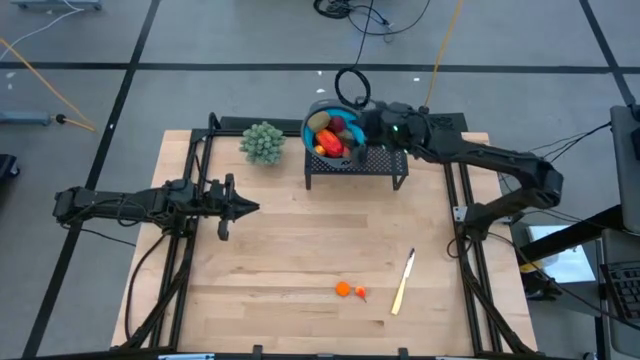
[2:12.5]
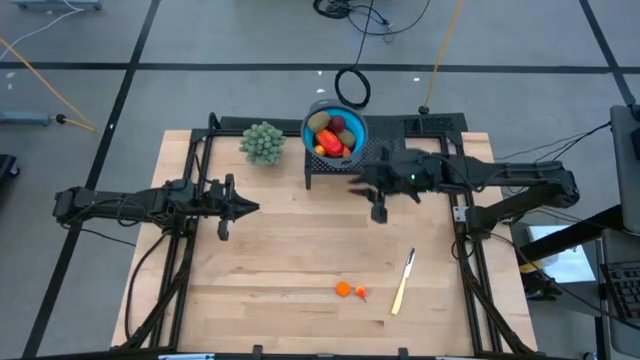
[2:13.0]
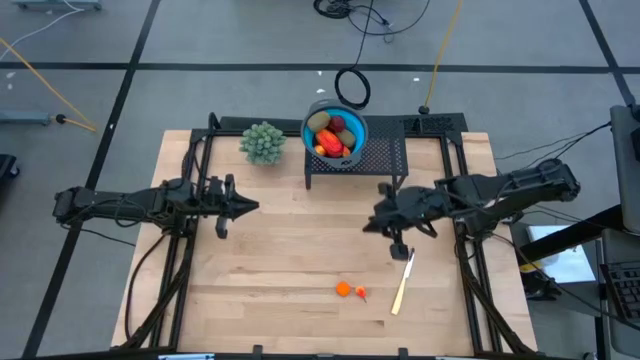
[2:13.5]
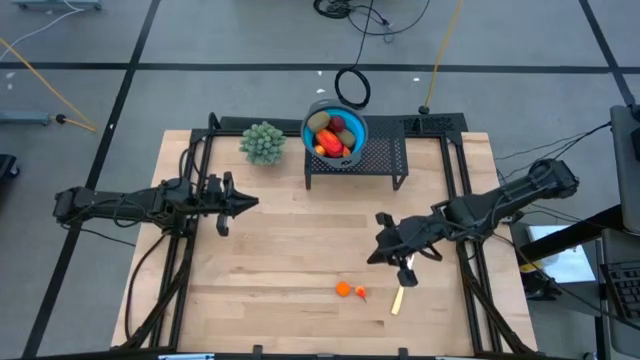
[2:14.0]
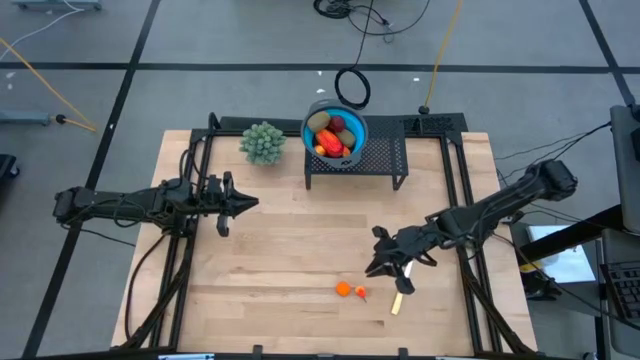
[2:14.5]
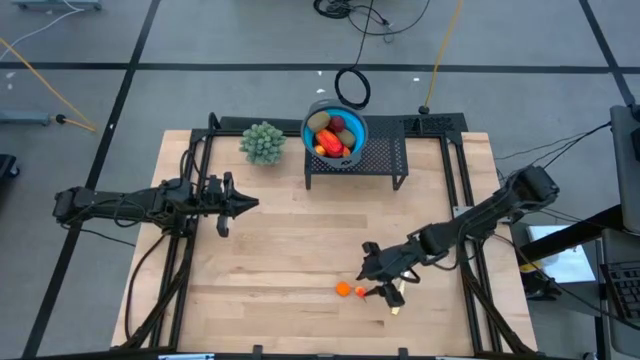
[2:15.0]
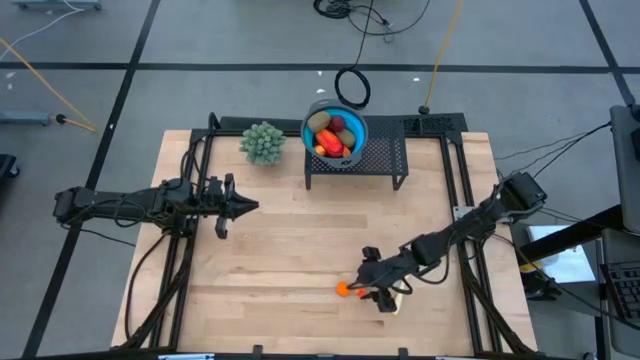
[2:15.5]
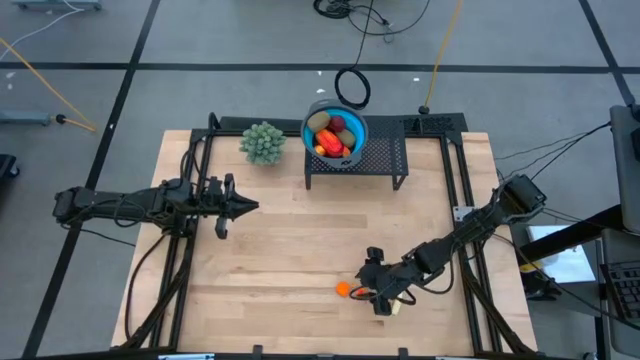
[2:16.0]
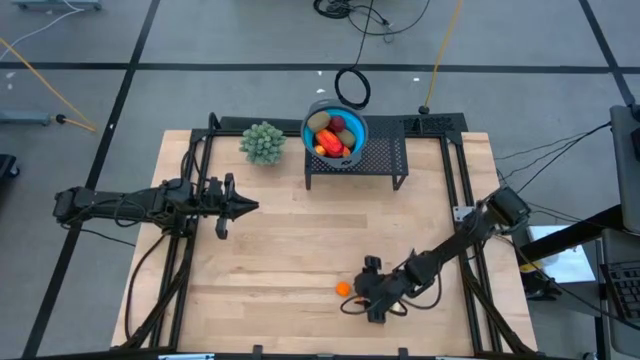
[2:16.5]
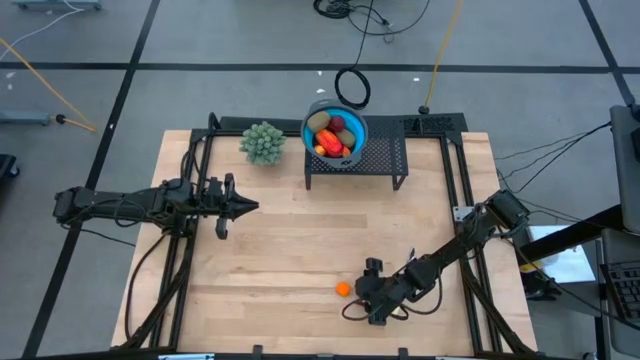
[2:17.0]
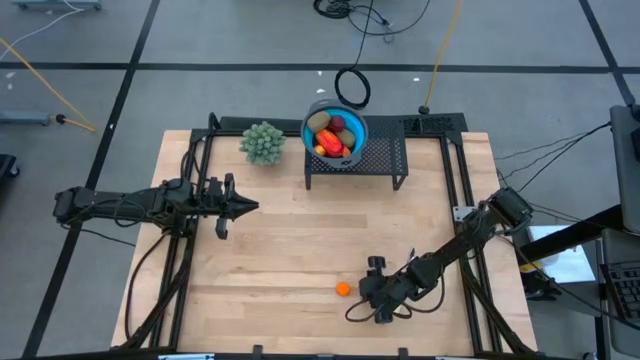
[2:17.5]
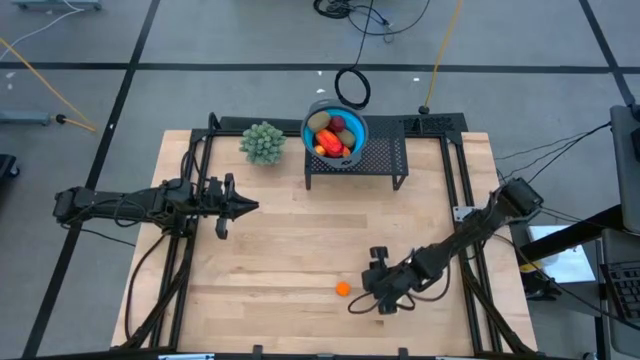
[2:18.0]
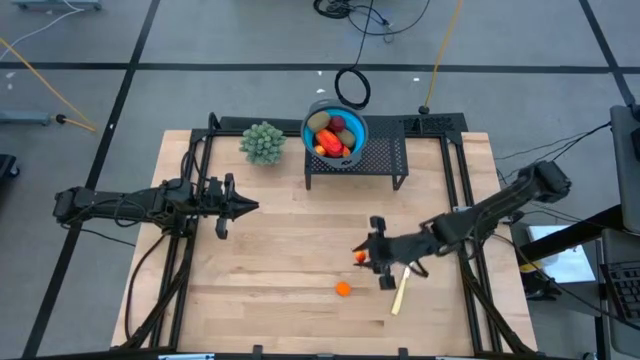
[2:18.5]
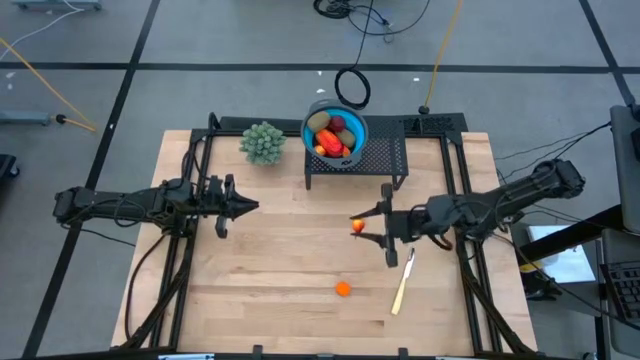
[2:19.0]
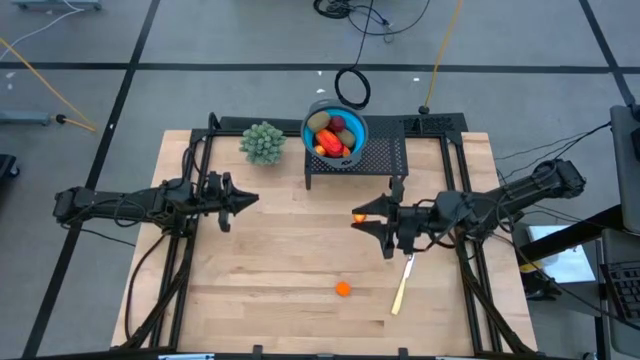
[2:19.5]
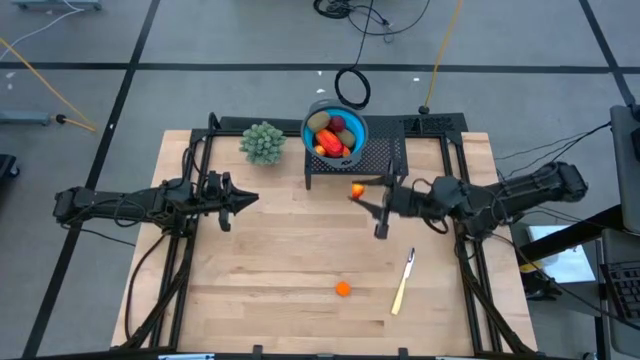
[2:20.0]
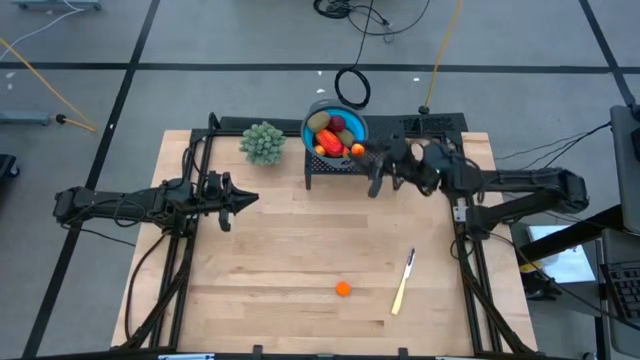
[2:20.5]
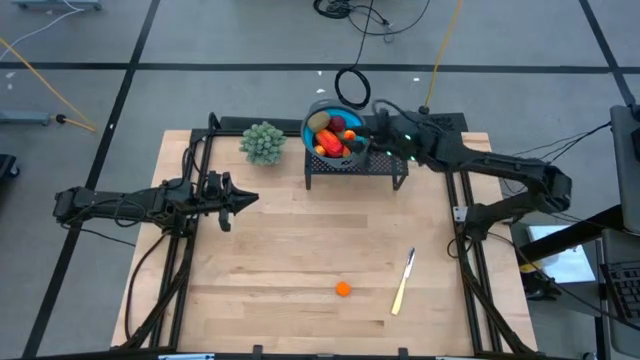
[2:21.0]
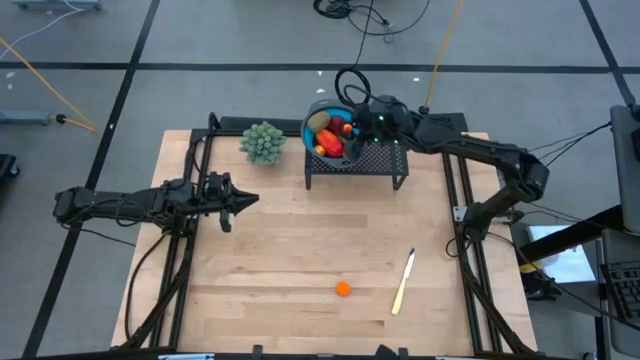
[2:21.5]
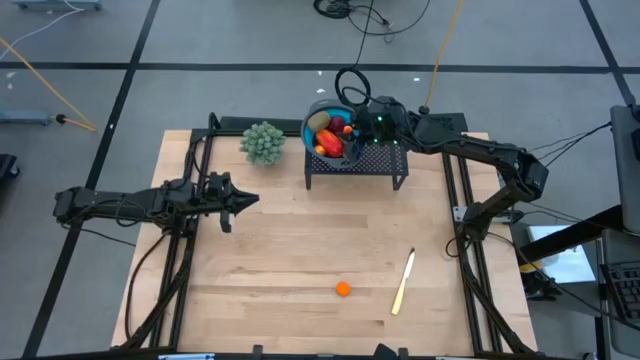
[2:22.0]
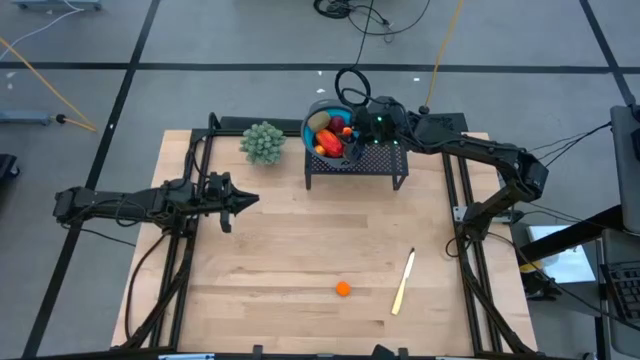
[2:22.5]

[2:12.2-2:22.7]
Task: Pick & Place Fruit
Put the peach into the blue strainer on the shelf

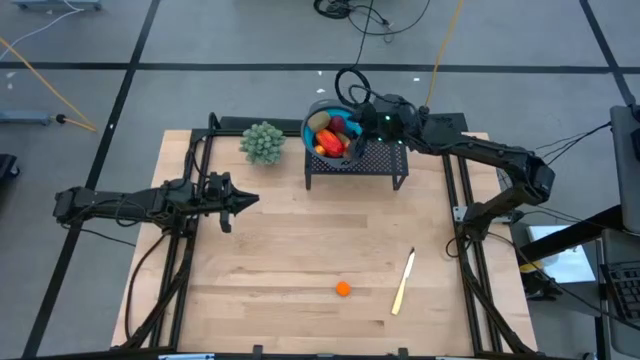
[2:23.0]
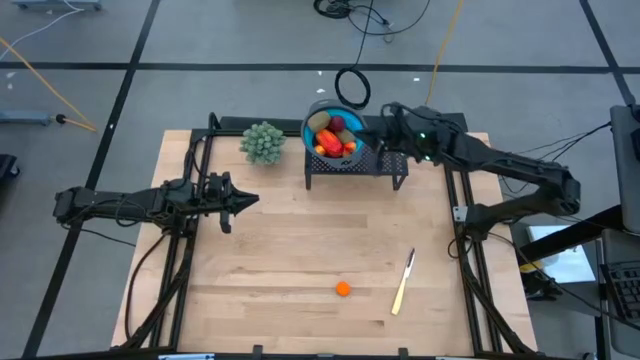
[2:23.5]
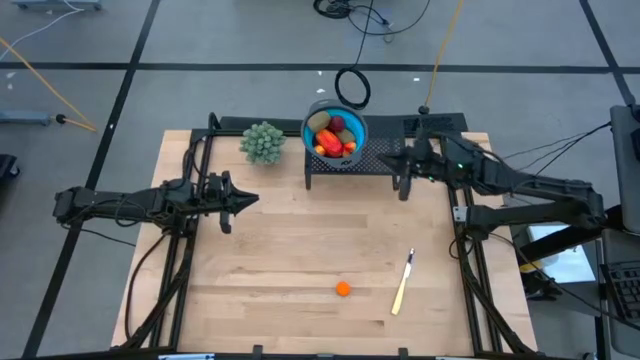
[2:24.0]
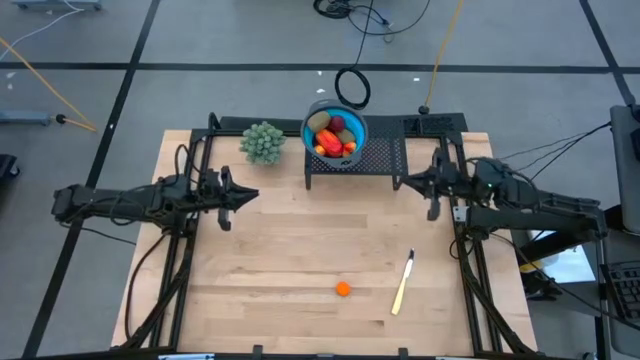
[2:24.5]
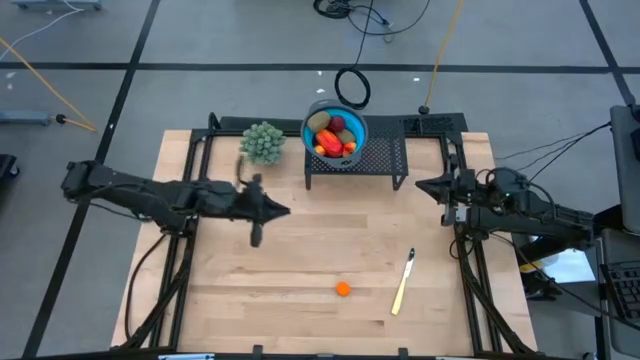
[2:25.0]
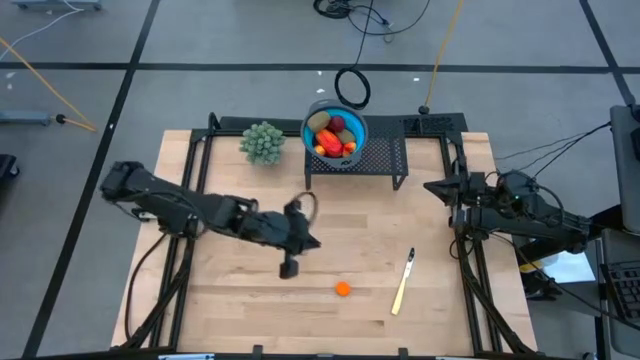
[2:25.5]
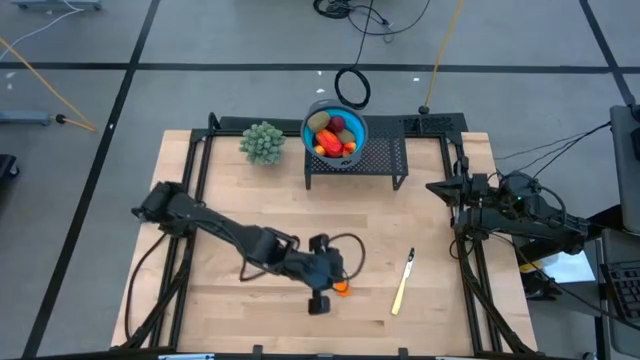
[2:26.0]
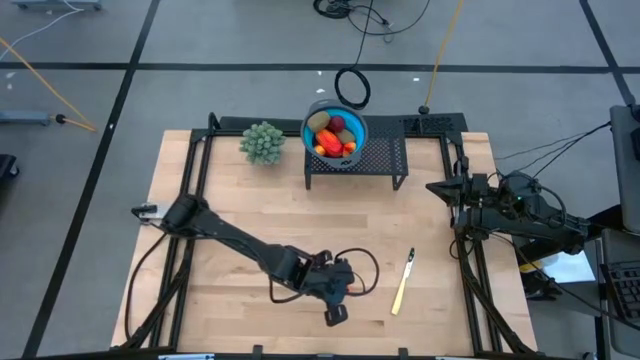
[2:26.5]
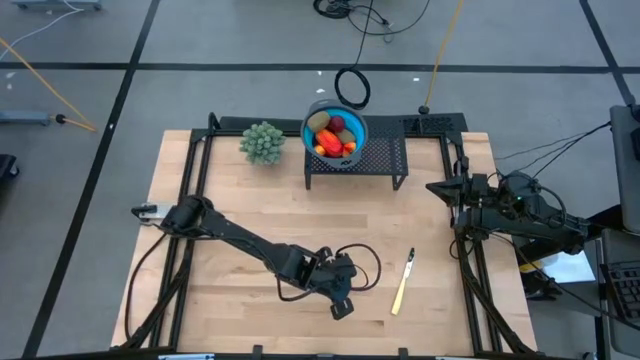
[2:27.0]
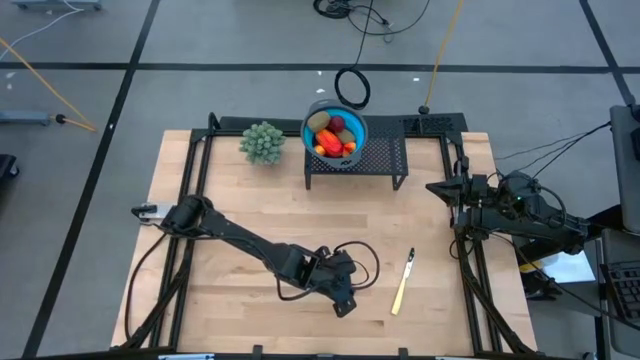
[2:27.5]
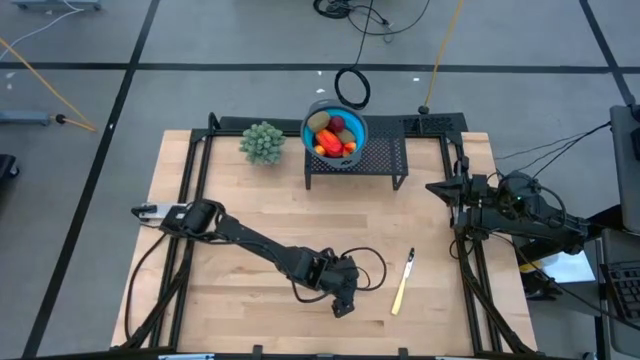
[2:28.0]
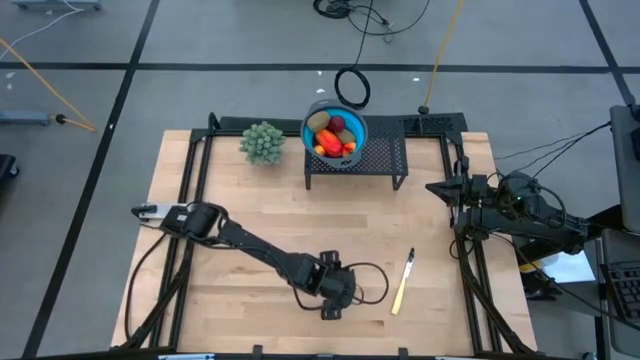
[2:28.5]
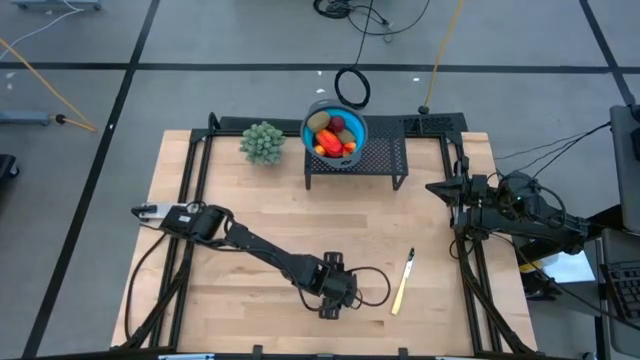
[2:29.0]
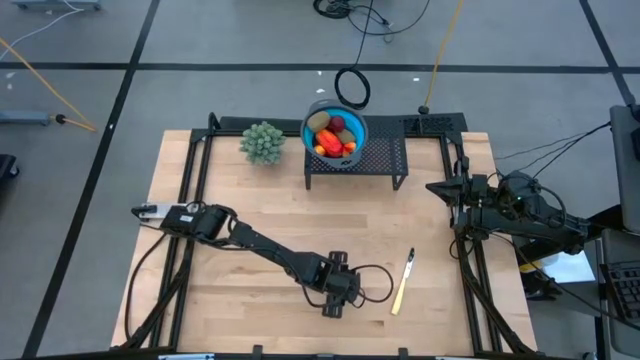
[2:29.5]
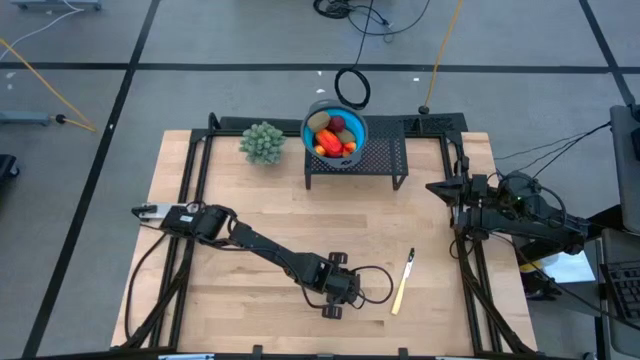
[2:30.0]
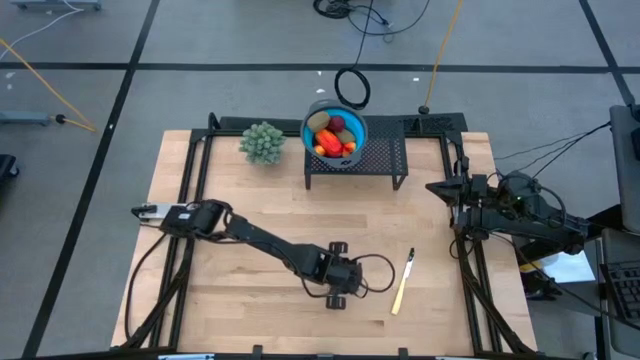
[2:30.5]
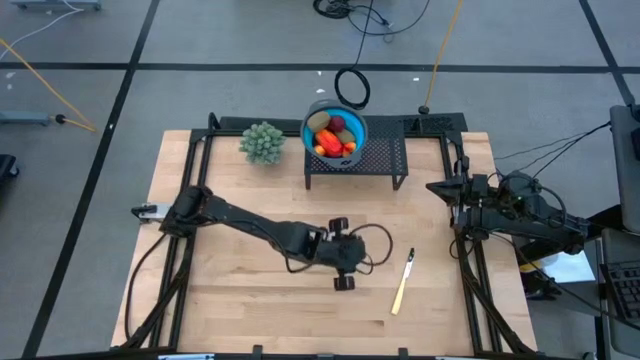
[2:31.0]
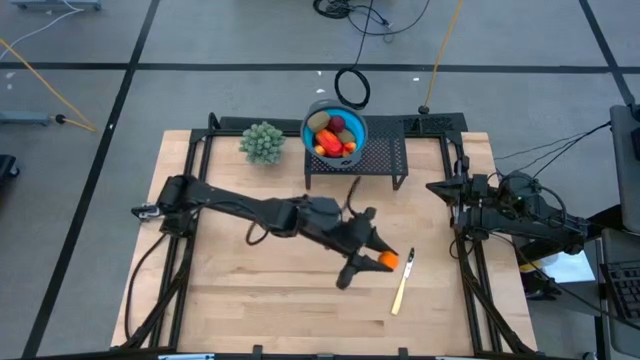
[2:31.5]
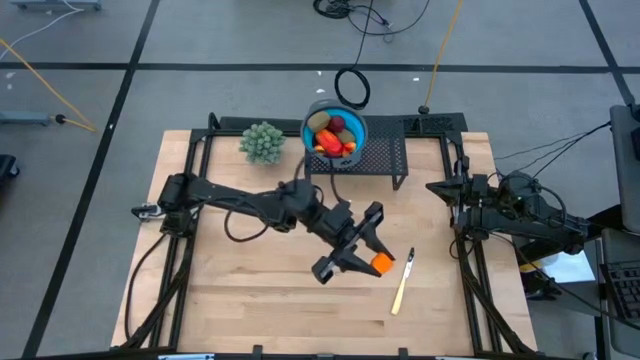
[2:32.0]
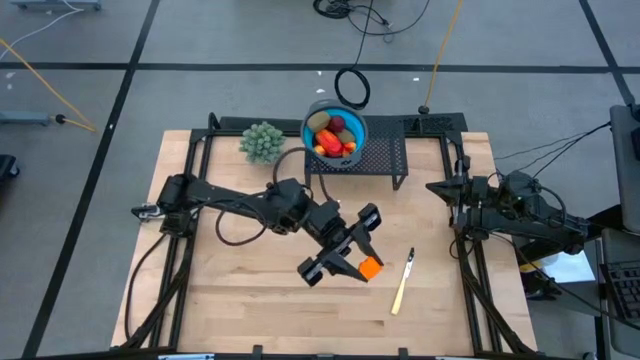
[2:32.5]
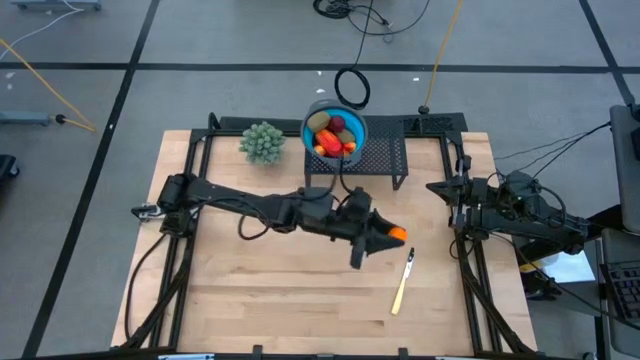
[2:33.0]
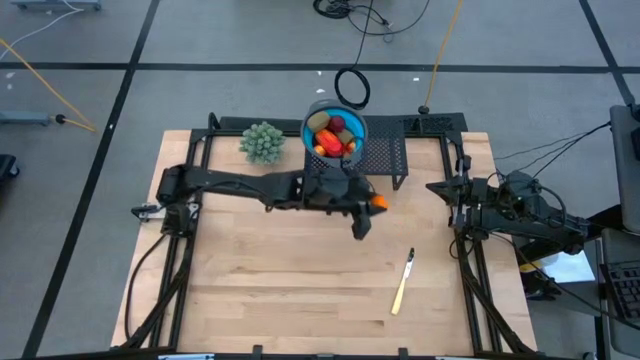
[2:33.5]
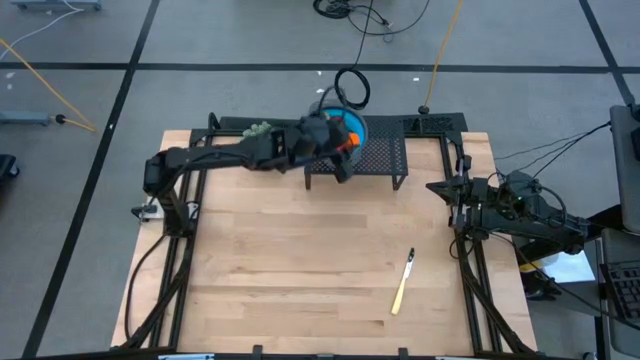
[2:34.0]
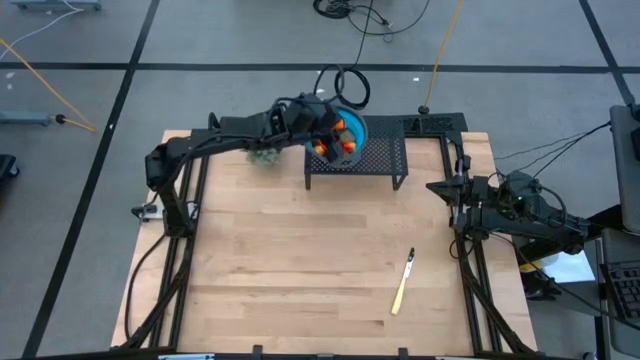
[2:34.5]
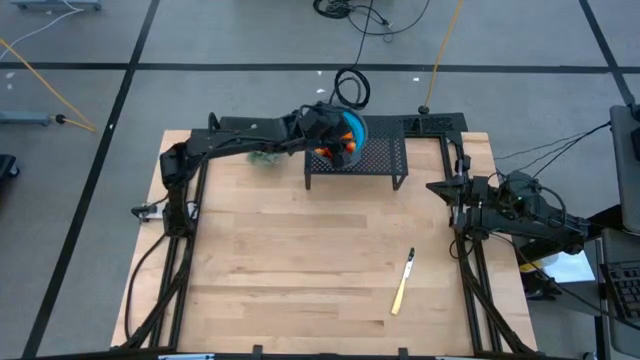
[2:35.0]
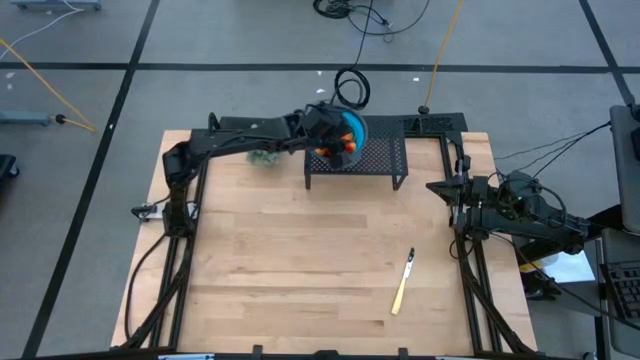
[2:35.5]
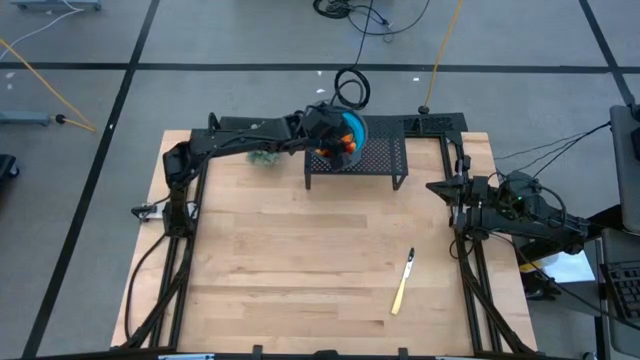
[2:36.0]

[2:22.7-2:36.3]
Put the orange into the blue strainer on the shelf
